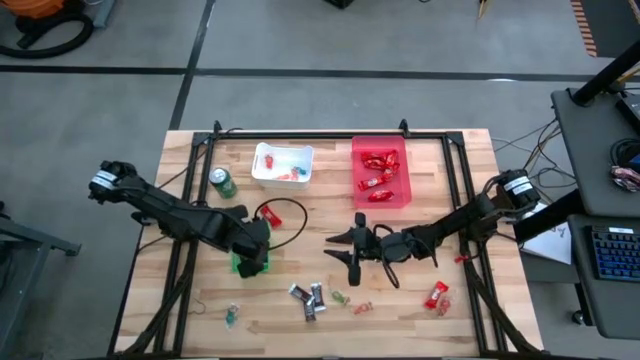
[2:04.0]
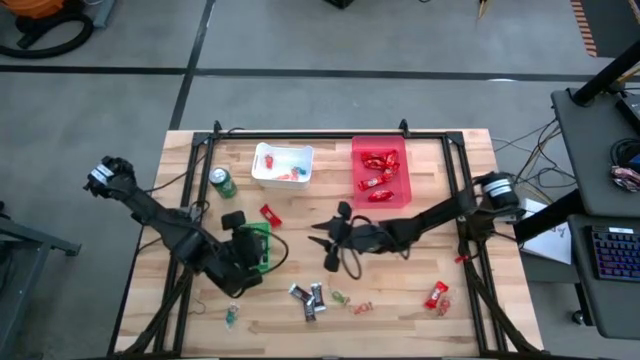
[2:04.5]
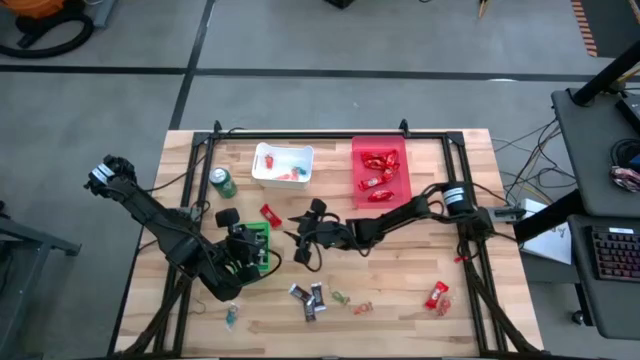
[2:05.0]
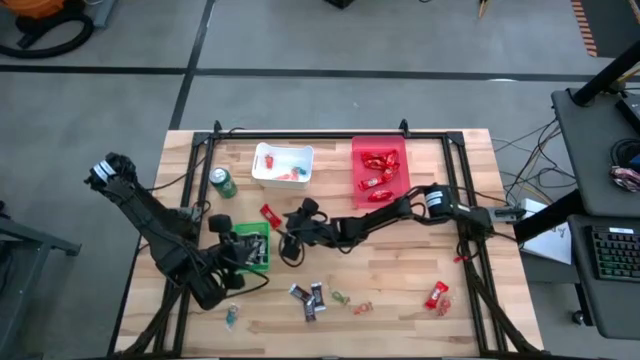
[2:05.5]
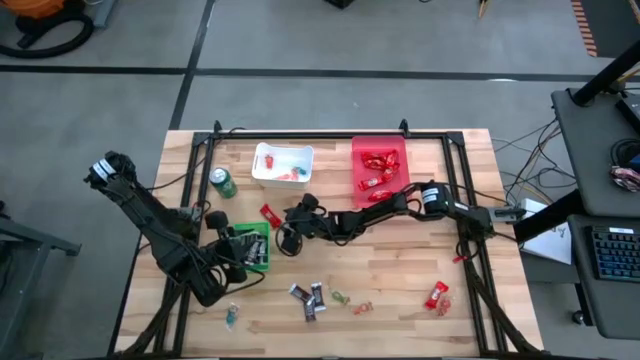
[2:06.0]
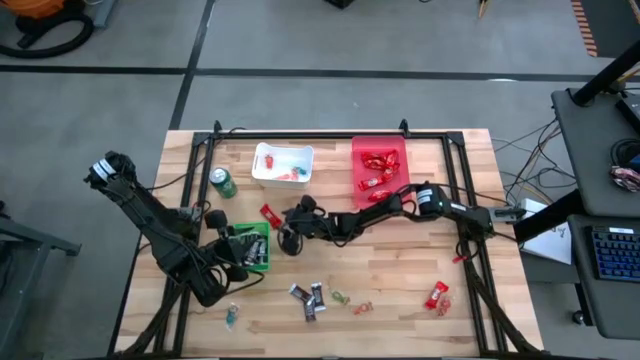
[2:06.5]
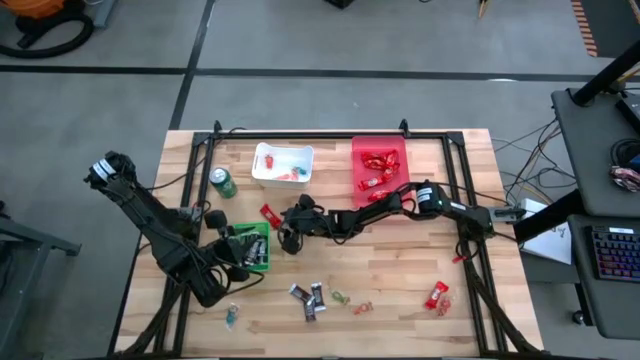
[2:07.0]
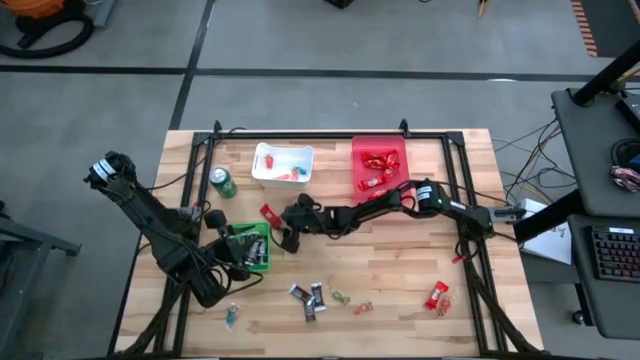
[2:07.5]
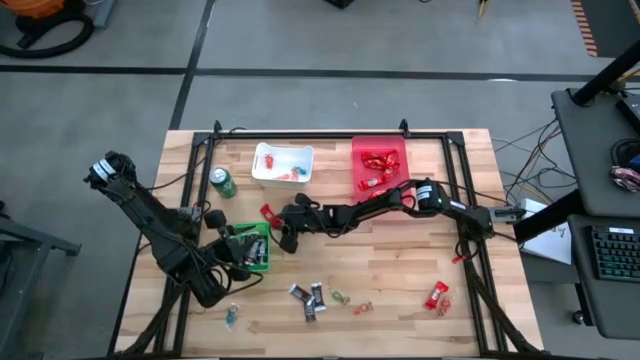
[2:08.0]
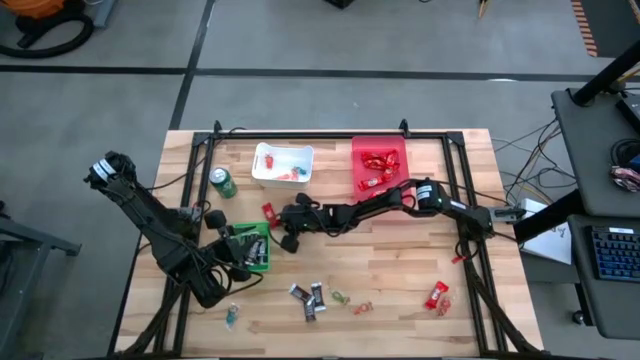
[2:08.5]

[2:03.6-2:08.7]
Task: Organize candy in baskets
Put the red chocolate into the pink bin

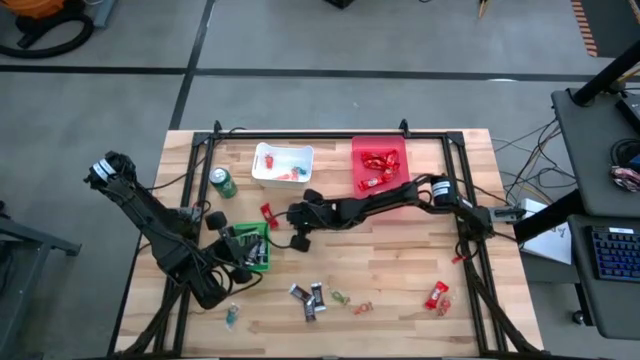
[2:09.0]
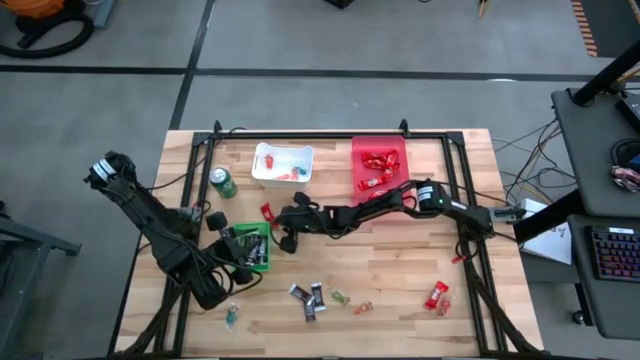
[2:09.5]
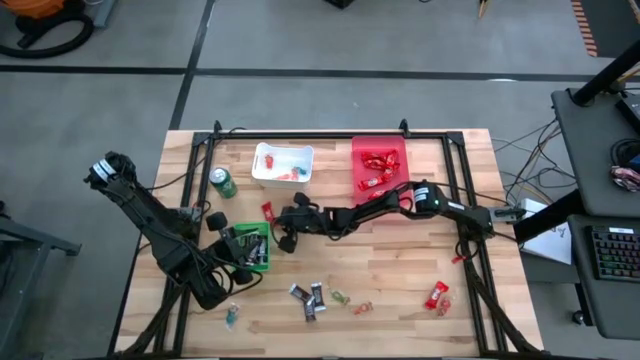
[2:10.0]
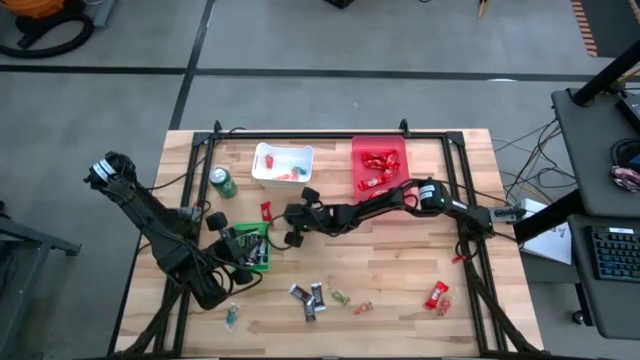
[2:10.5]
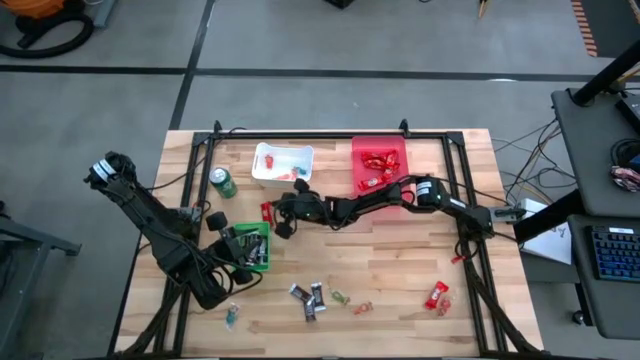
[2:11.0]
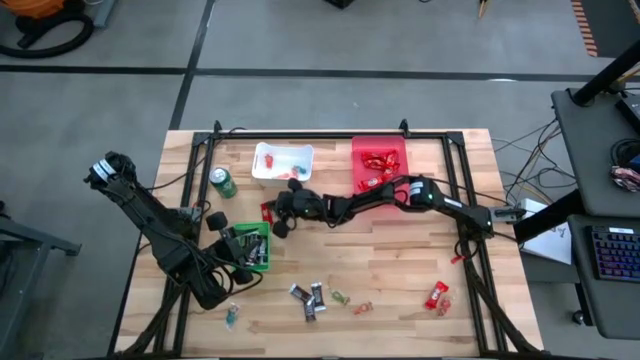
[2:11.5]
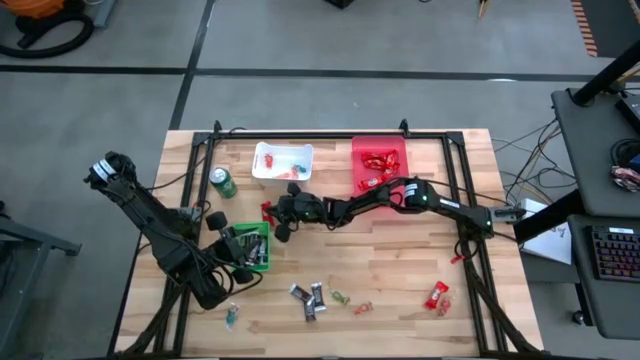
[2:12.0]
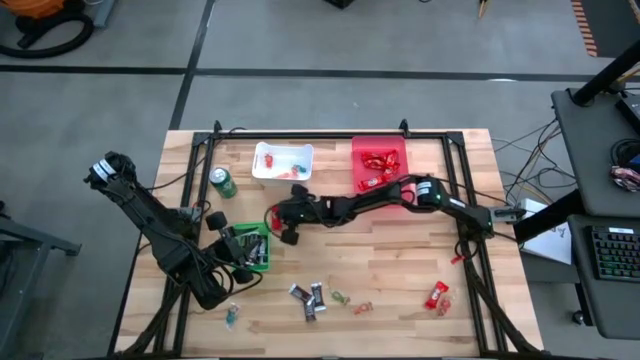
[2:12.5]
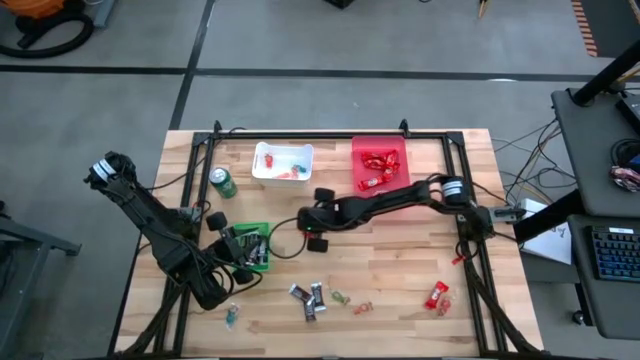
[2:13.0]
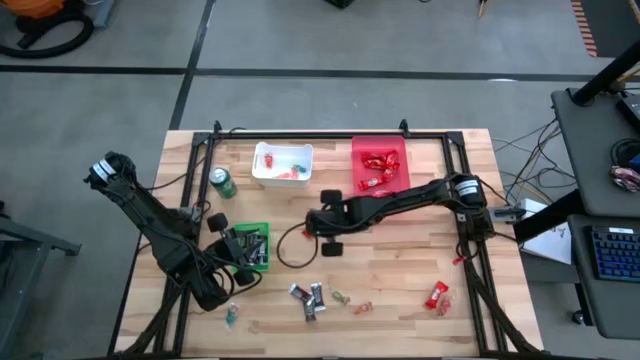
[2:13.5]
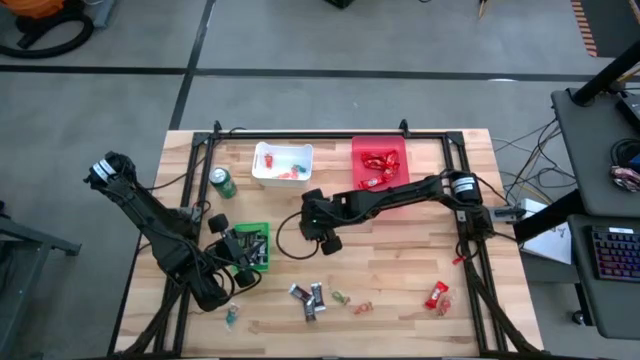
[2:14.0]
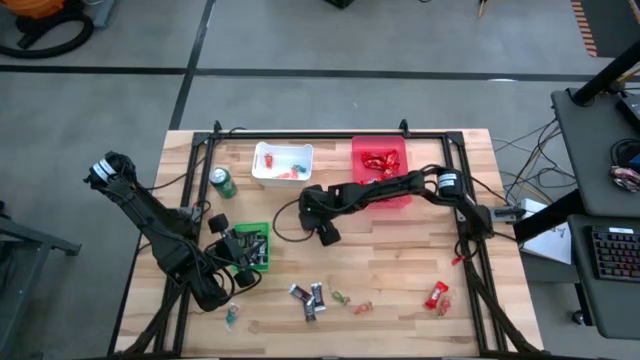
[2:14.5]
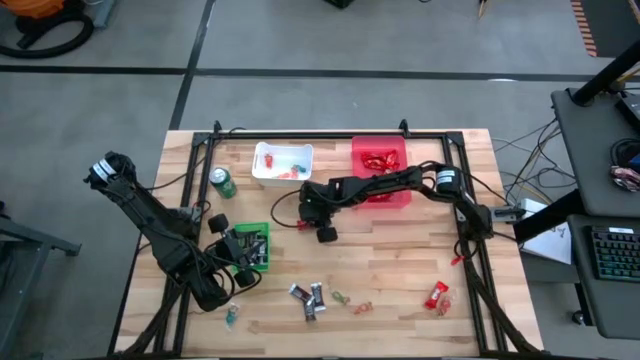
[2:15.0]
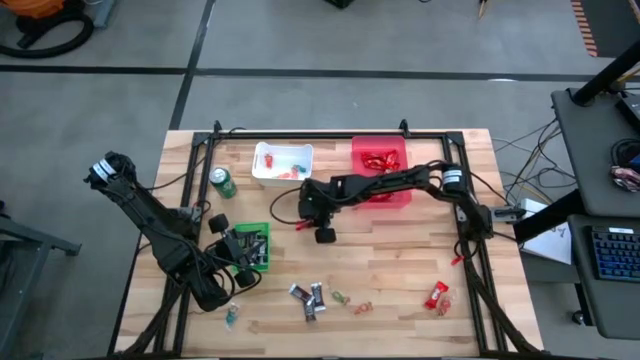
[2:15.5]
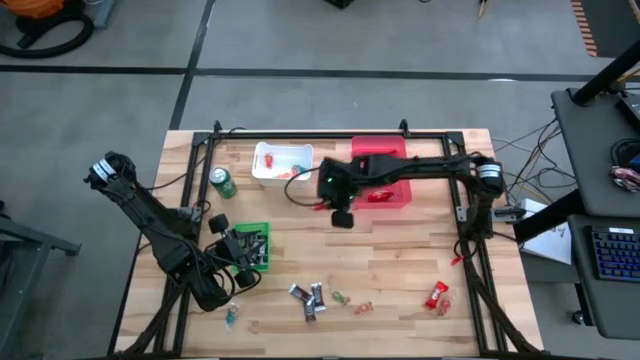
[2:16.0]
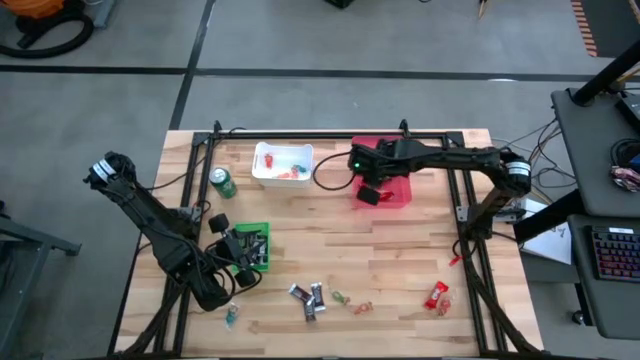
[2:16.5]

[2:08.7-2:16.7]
Put the red chocolate into the pink bin

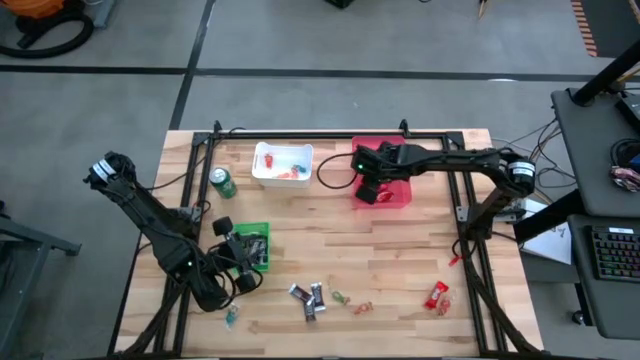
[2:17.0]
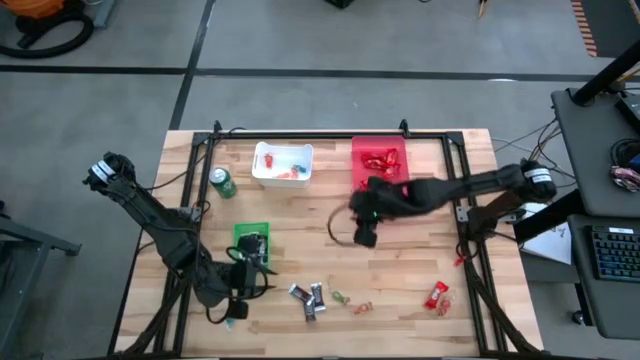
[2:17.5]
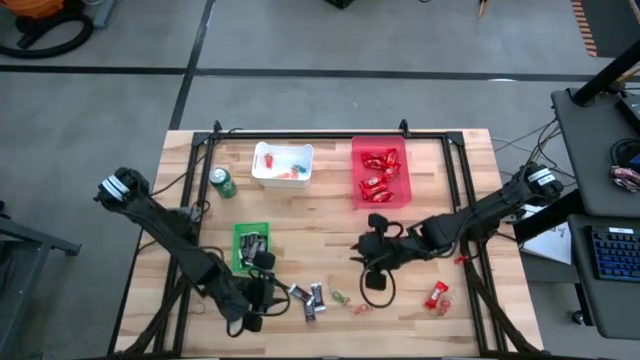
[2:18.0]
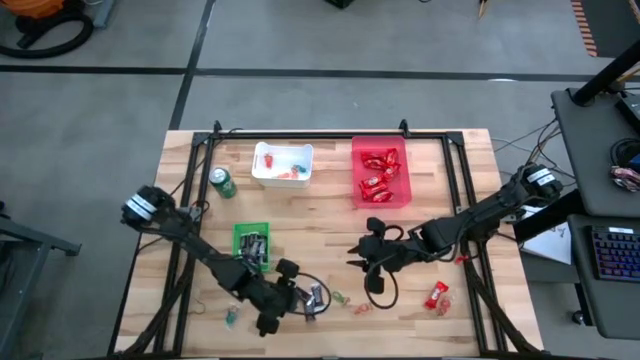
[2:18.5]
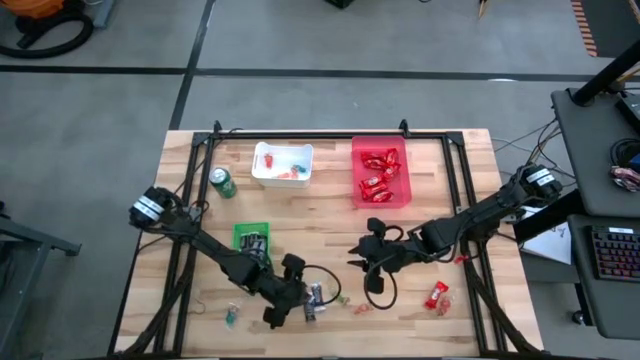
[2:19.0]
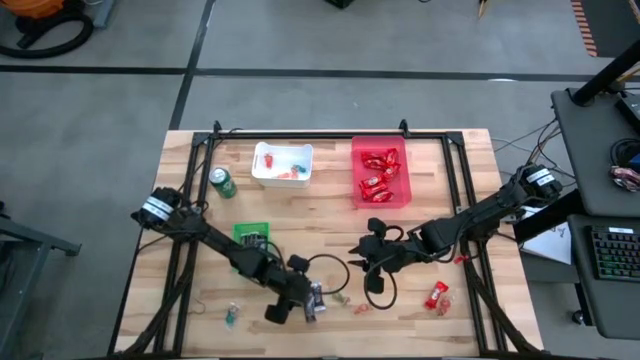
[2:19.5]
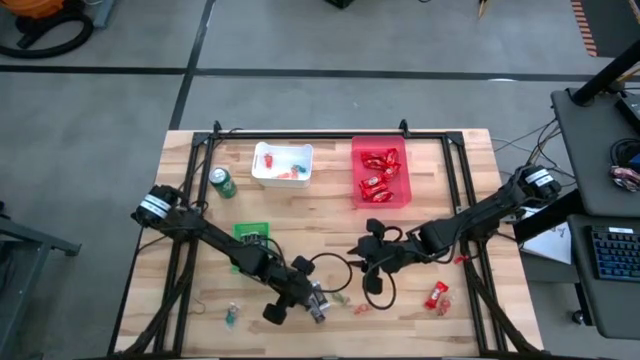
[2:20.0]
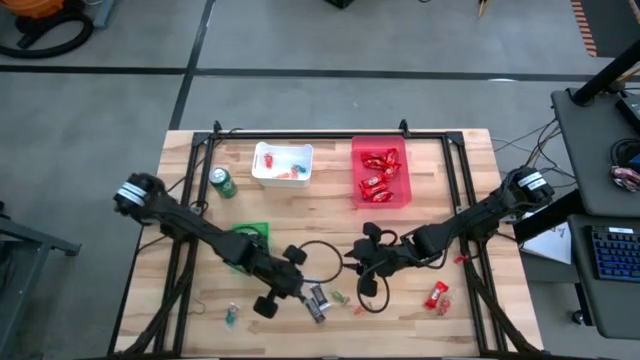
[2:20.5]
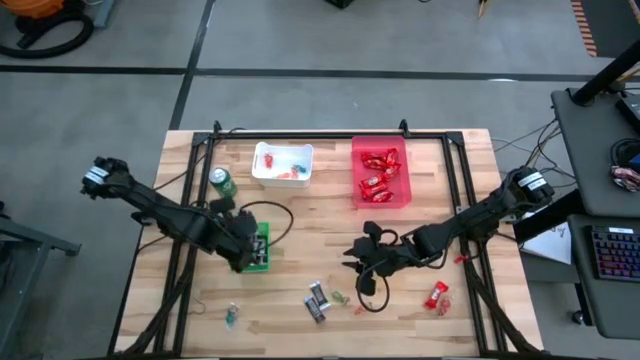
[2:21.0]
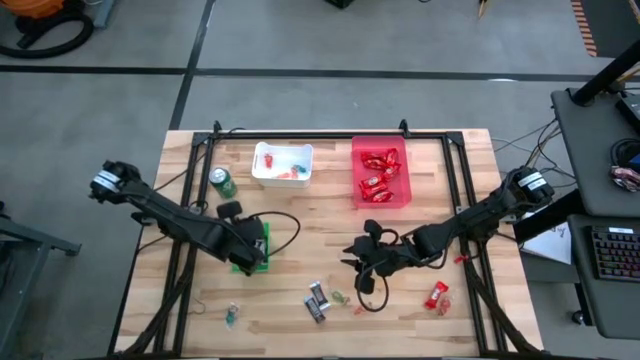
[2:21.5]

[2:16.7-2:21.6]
Put the brown chocolate into the green basket

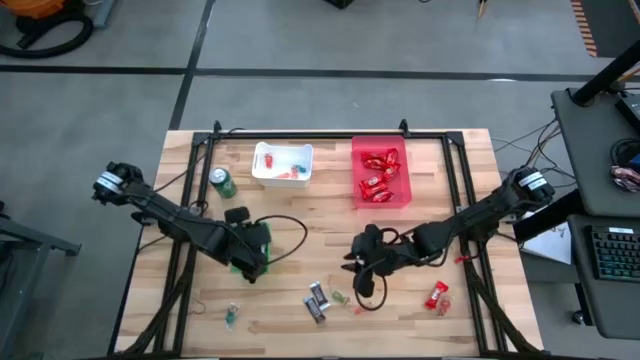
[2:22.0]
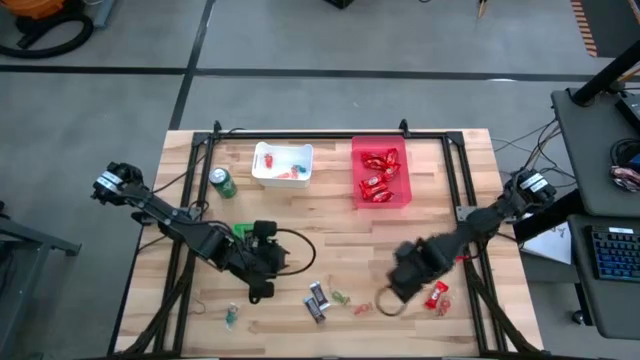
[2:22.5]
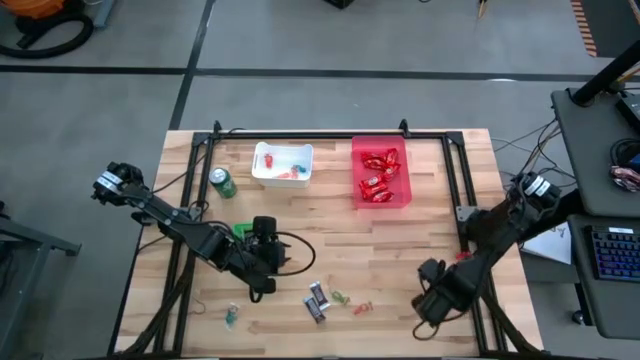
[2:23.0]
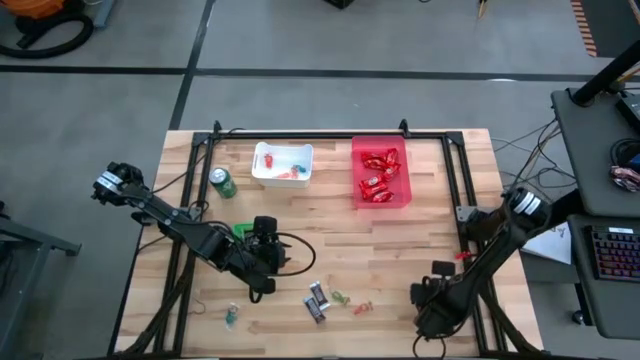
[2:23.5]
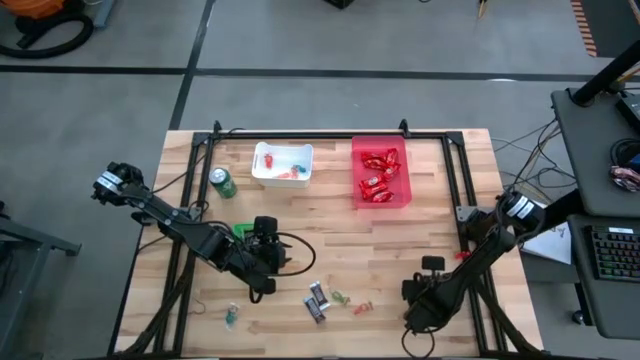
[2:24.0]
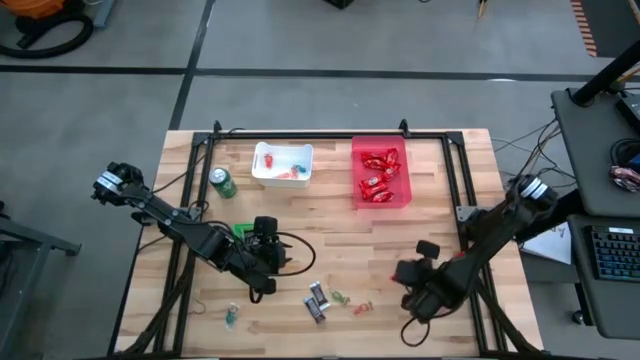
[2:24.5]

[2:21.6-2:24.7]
Put the red chocolate into the pink bin

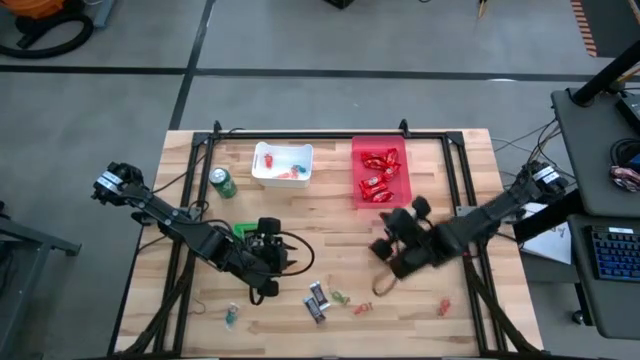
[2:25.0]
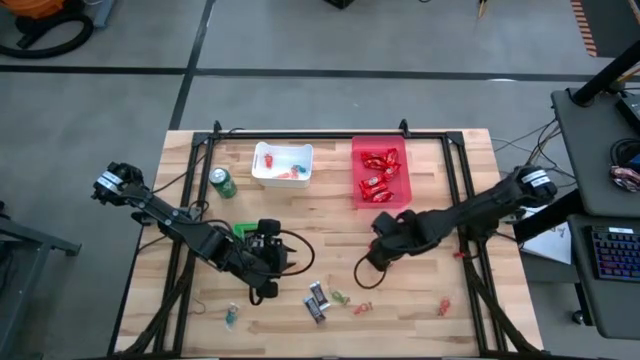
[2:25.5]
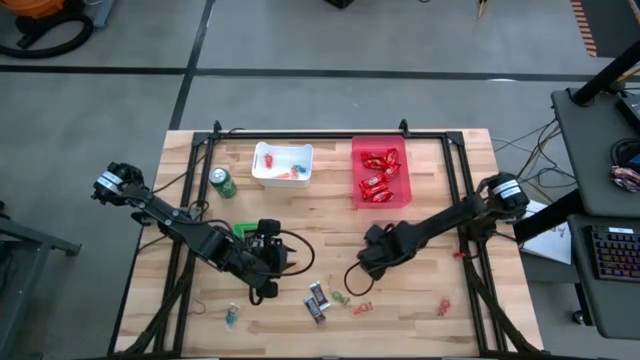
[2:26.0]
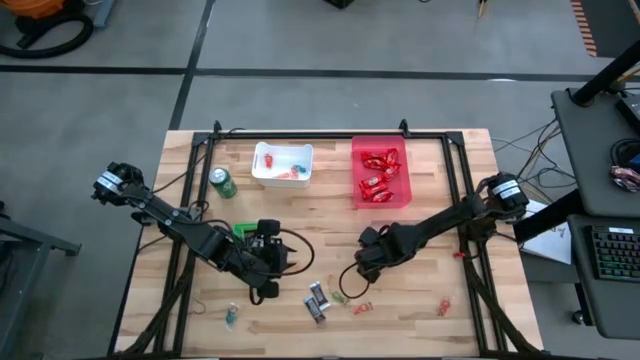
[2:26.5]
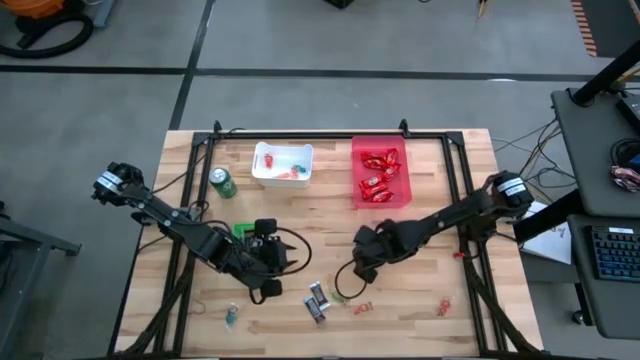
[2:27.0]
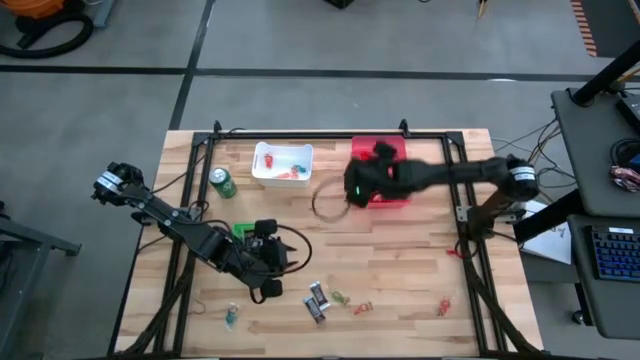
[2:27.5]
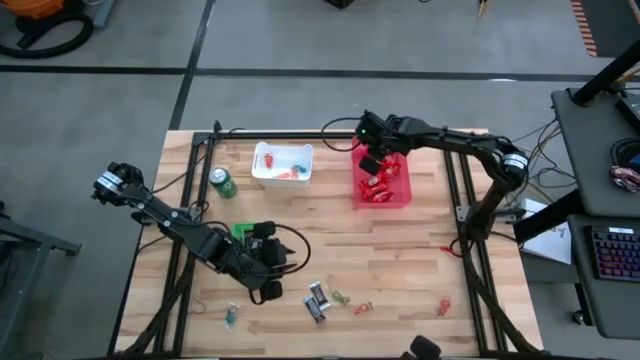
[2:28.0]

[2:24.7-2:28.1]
Put the red chocolate into the pink bin
